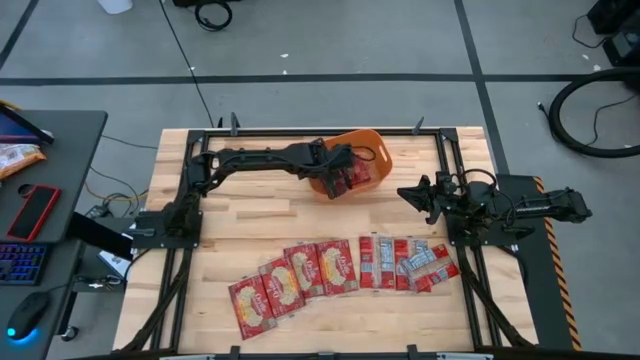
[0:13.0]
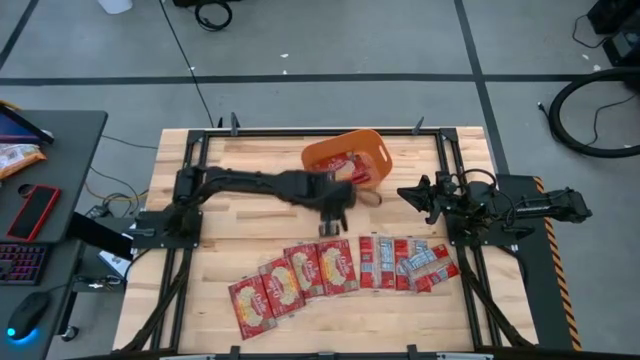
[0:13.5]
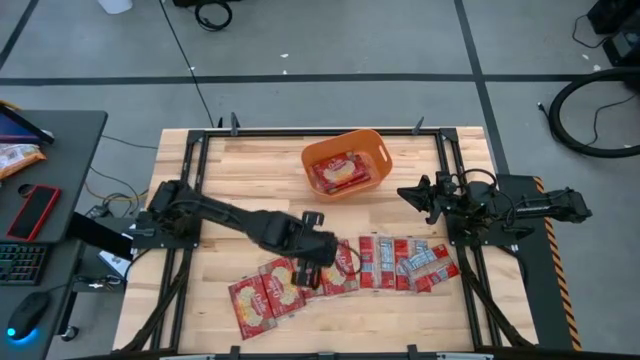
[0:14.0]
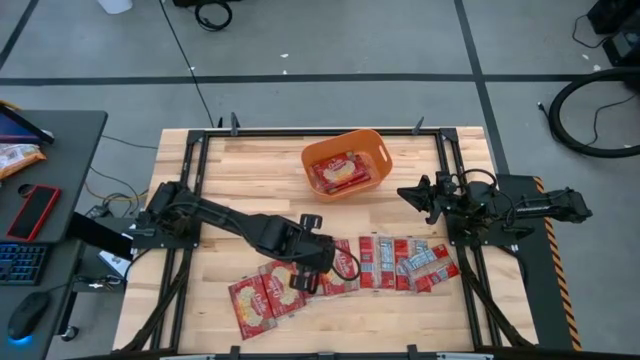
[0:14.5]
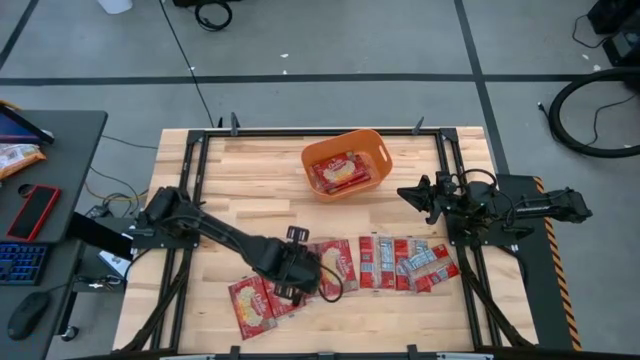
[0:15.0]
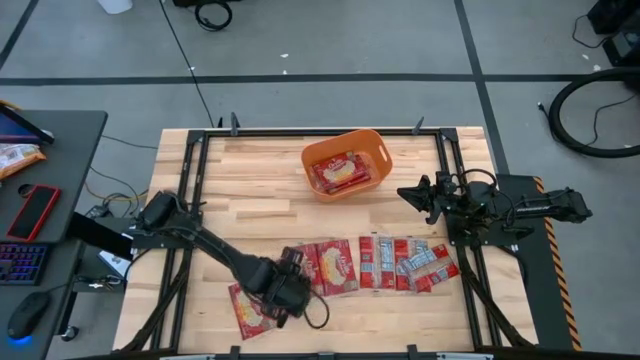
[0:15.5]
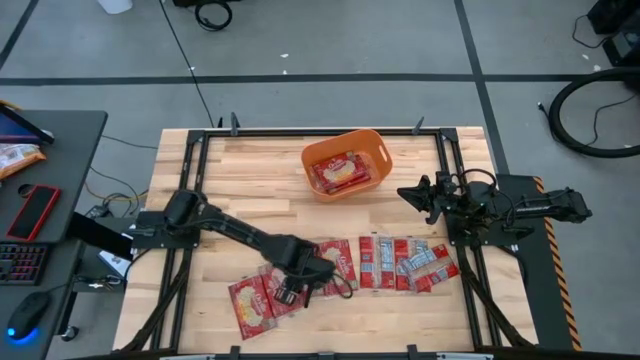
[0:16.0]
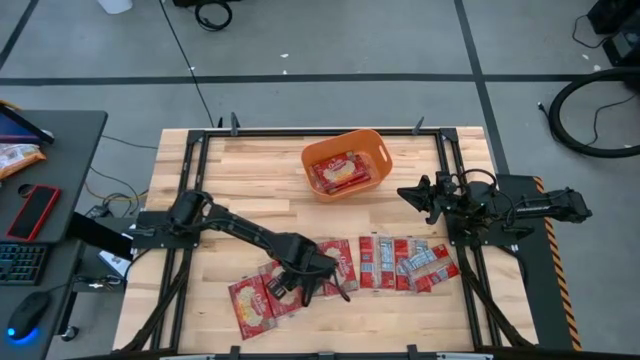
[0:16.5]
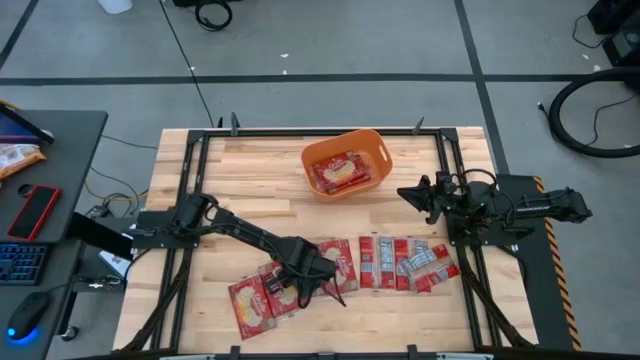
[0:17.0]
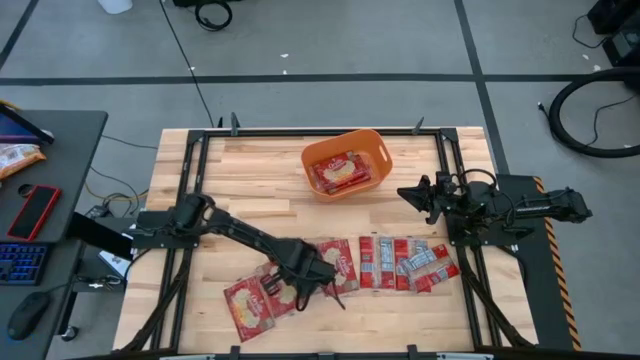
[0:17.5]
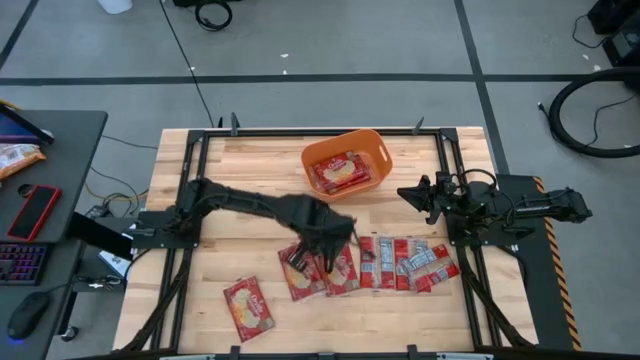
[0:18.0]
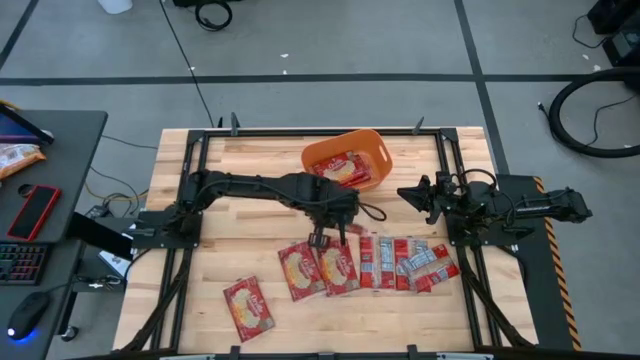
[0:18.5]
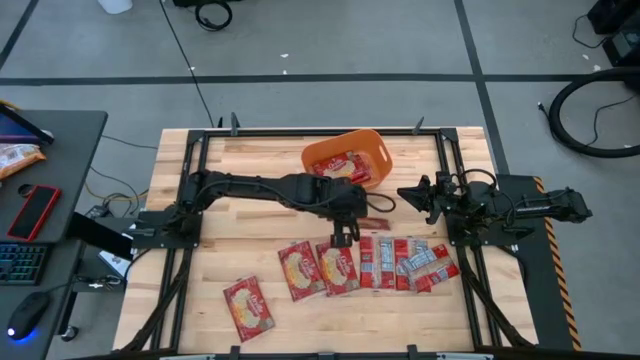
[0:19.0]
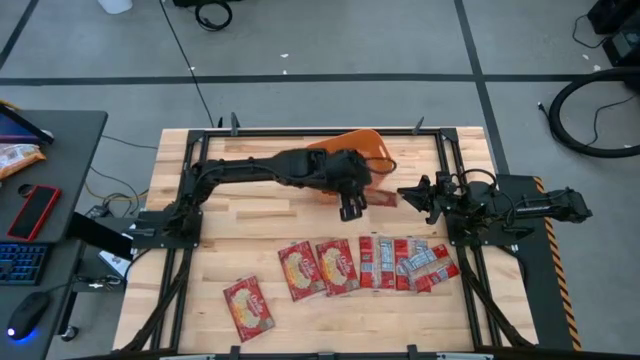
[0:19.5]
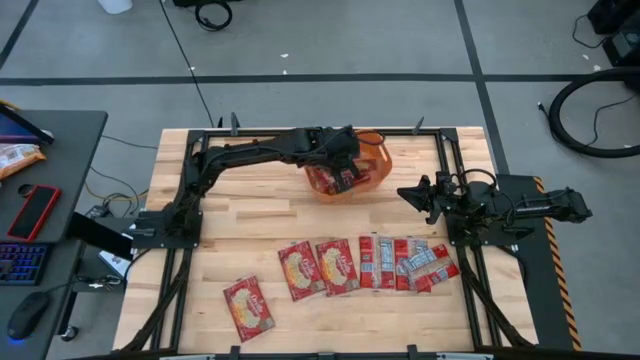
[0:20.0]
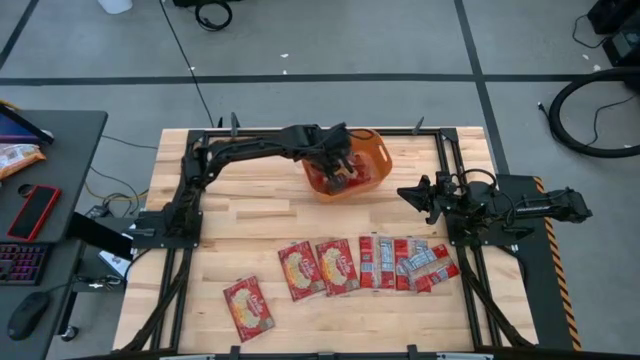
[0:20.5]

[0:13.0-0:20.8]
Task: Sort popcorn bags into baskets
Put the red popcorn bag into the orange bin

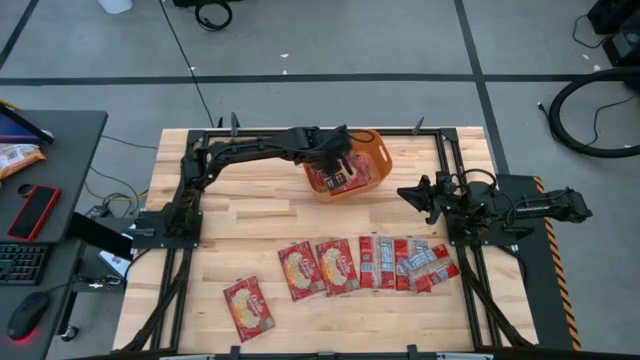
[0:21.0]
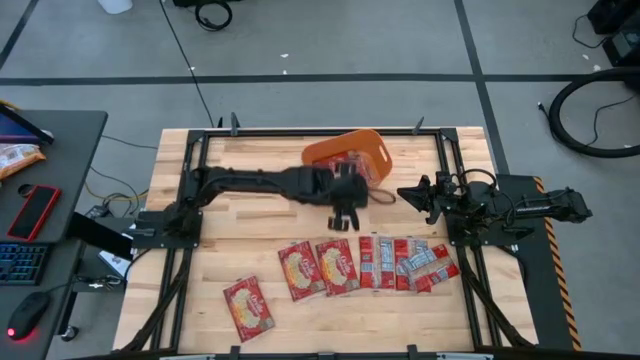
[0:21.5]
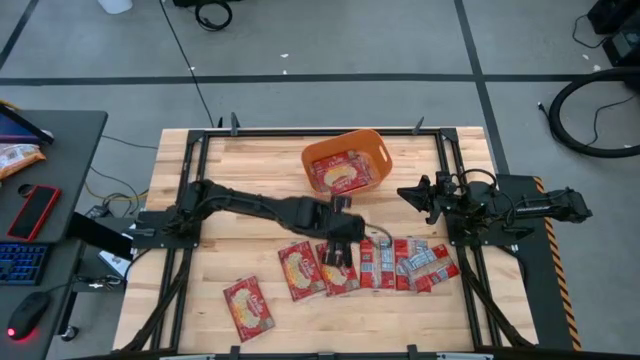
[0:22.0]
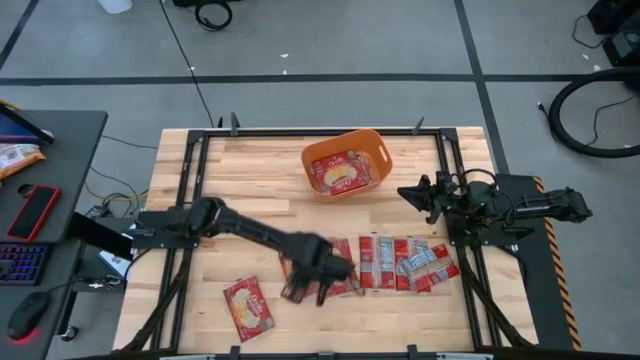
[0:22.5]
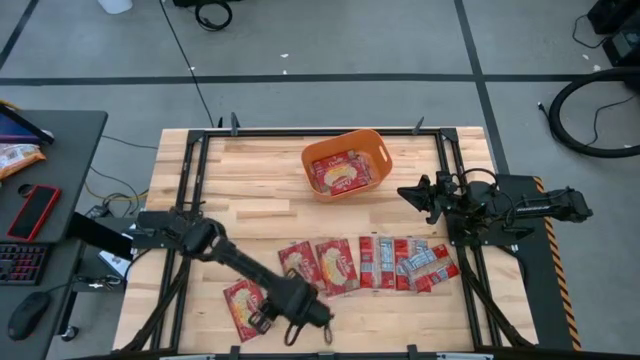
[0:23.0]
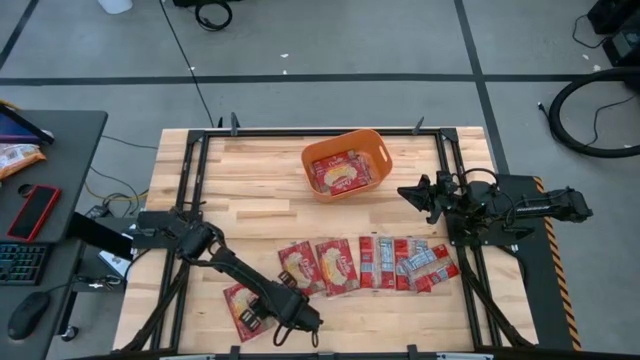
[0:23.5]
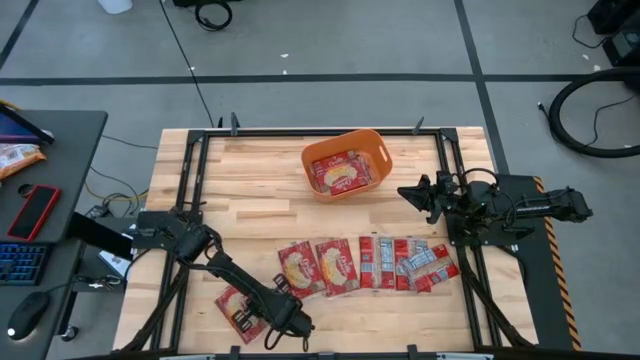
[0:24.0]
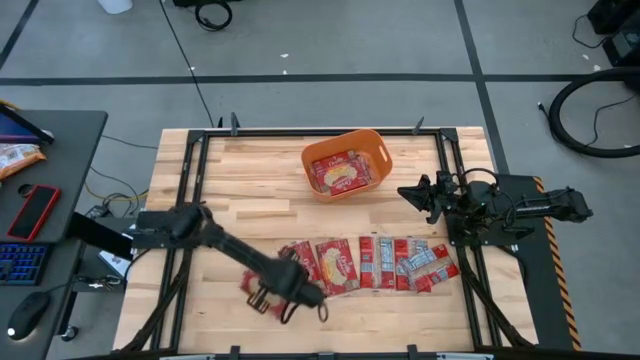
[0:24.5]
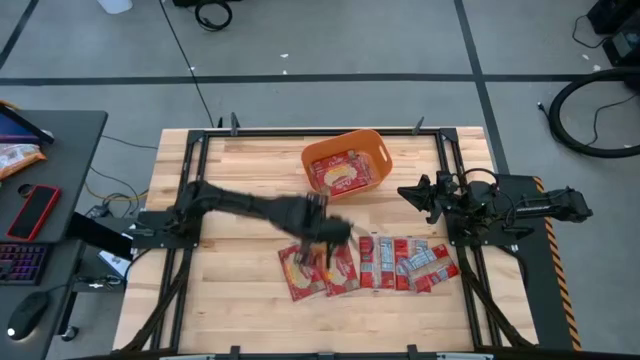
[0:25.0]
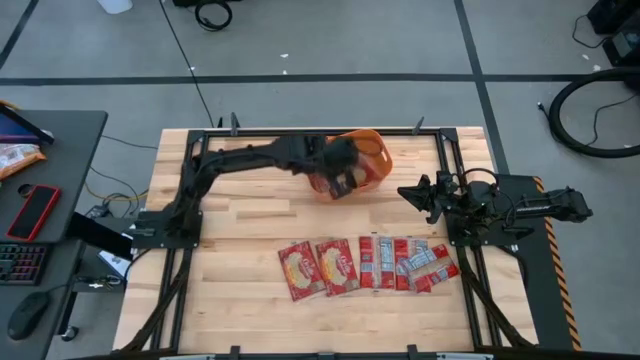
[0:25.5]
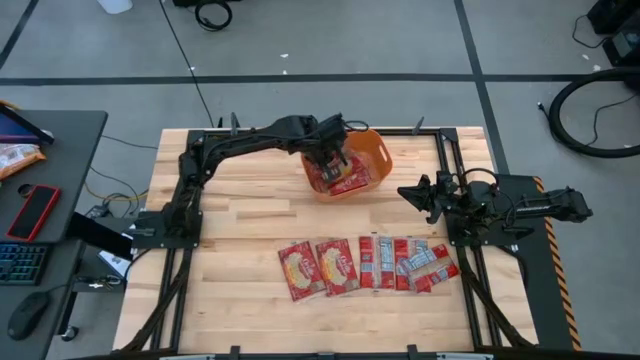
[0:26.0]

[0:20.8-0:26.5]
Put the red popcorn bag into the orange bin

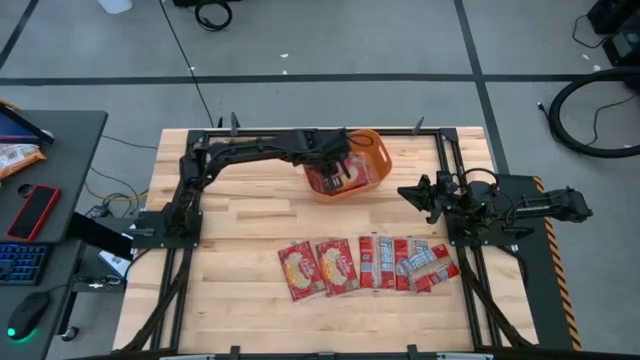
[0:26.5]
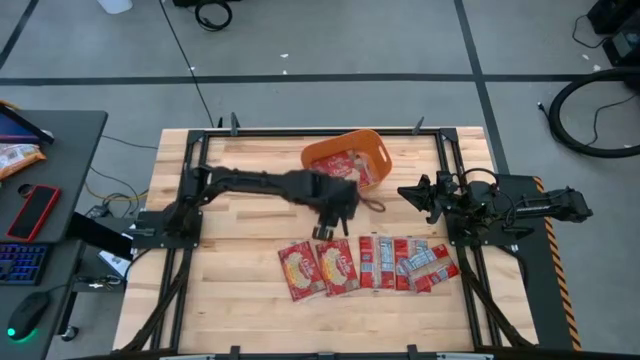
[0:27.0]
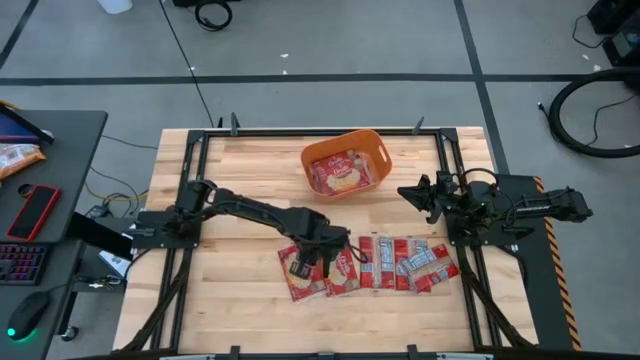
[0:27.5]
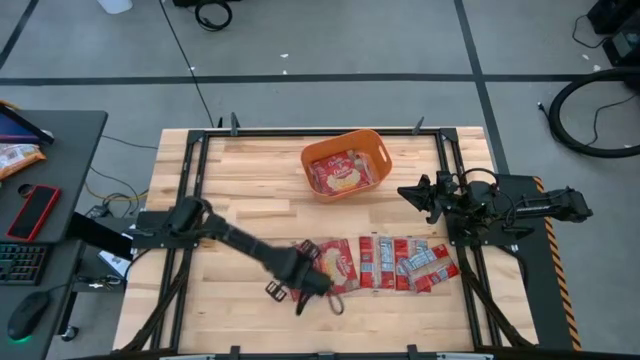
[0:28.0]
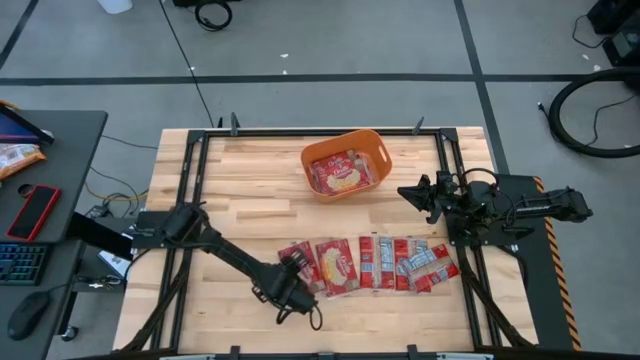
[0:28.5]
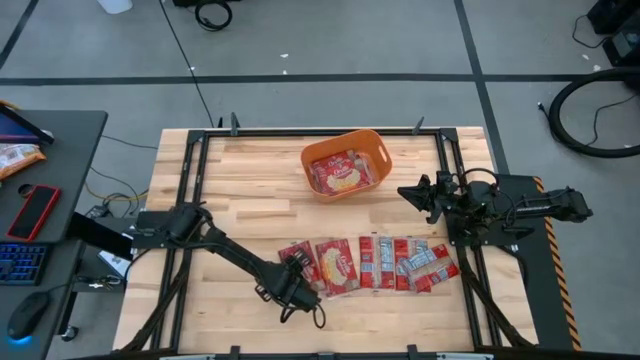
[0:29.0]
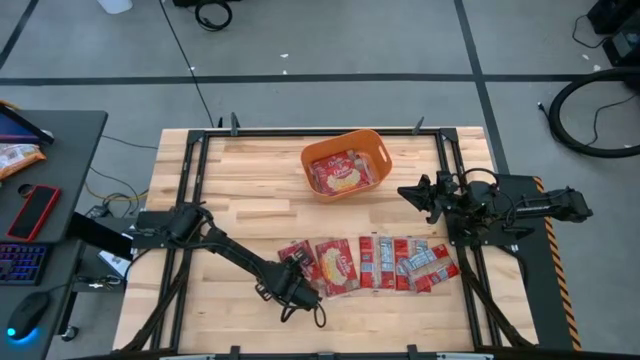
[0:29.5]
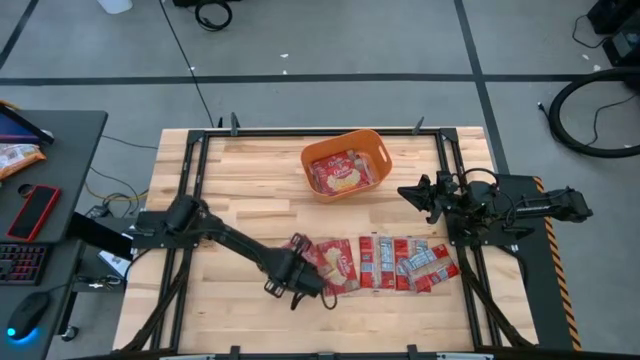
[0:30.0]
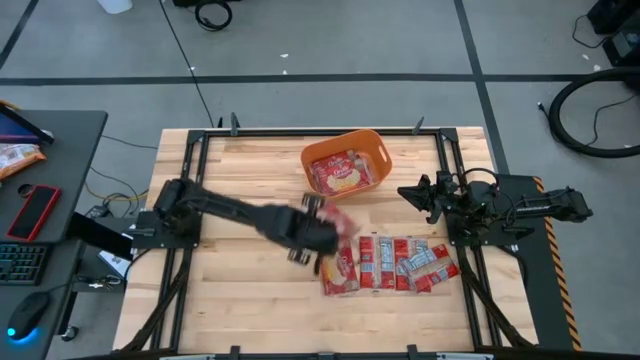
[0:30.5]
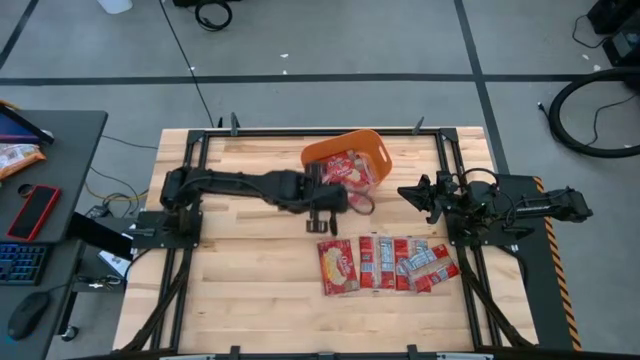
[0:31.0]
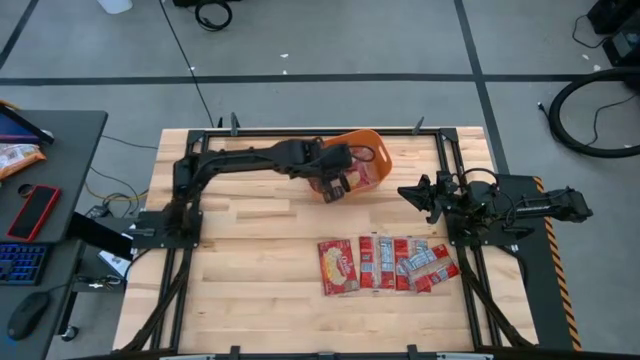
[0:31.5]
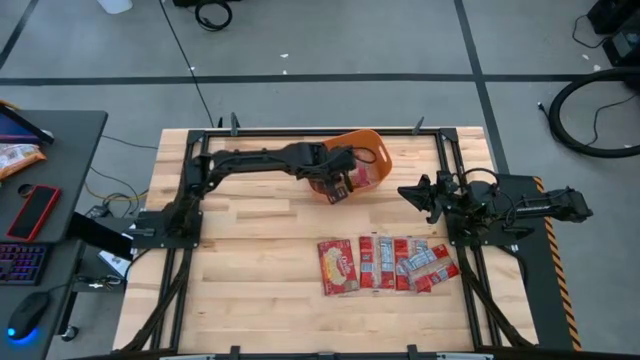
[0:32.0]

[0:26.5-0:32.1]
Put the red popcorn bag into the orange bin

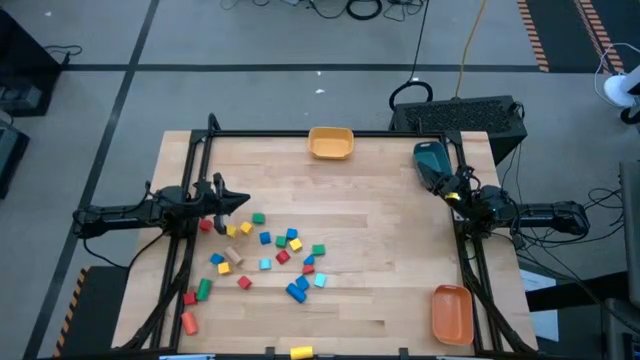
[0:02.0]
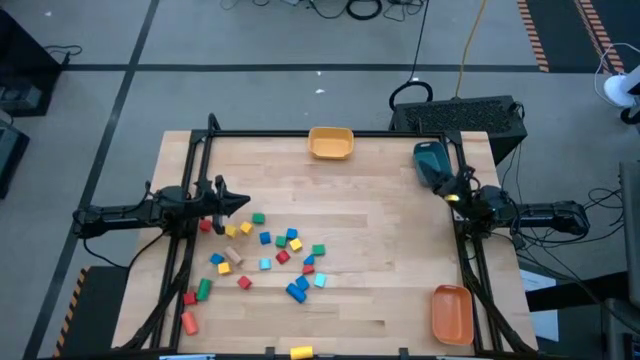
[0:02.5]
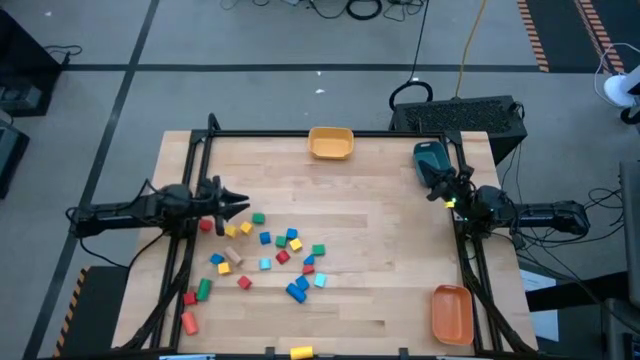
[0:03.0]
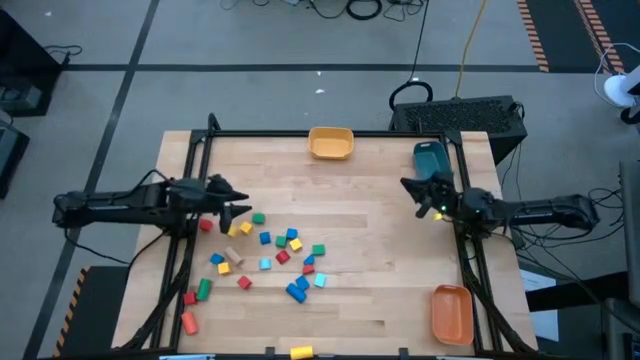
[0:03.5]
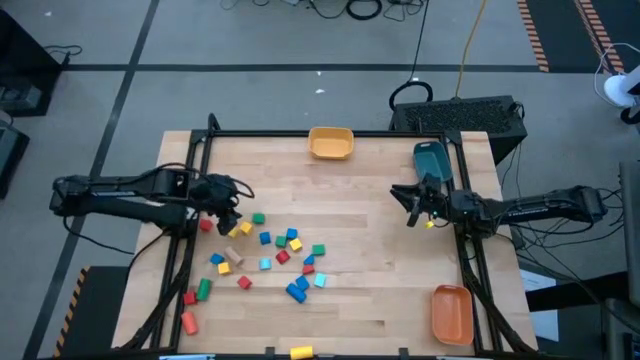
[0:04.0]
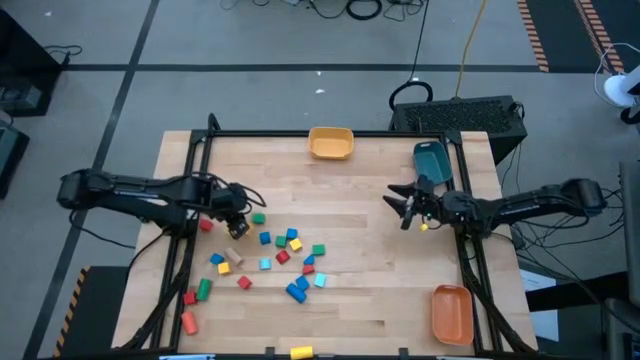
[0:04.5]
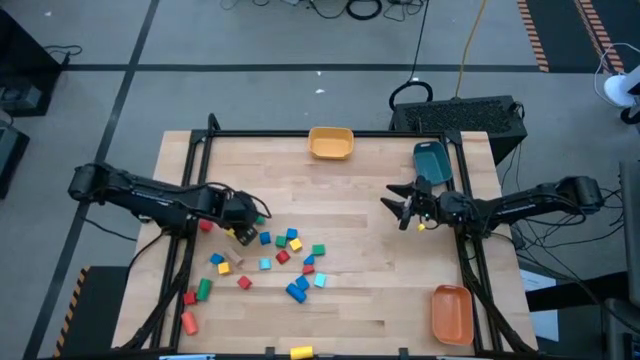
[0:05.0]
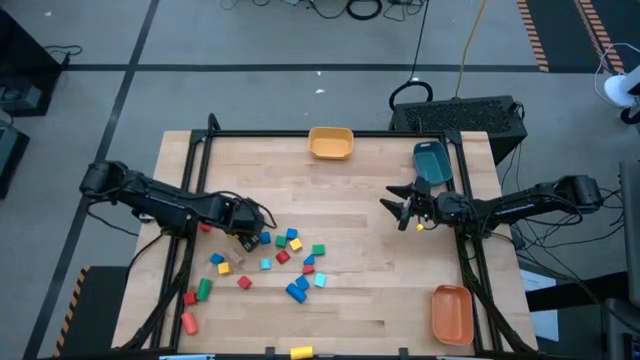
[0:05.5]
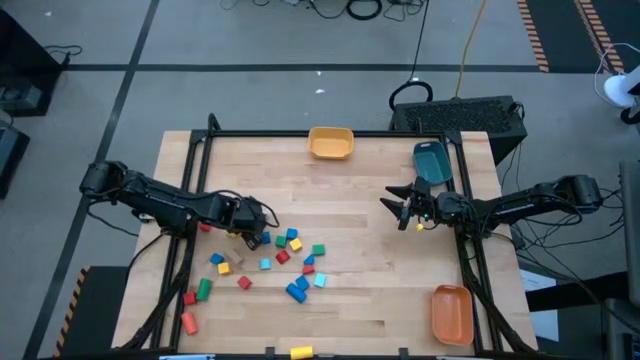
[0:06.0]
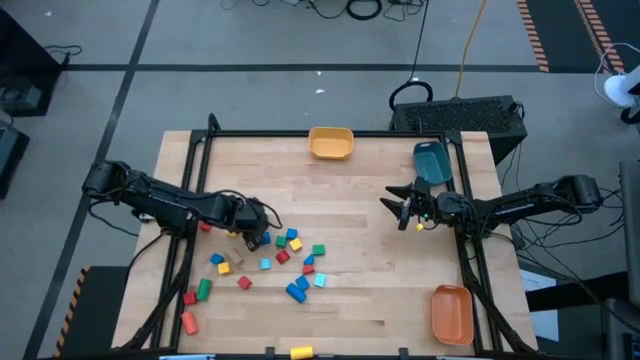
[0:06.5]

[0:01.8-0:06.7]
Task: Sort blocks by size
Put the yellow square block into the yellow bin
